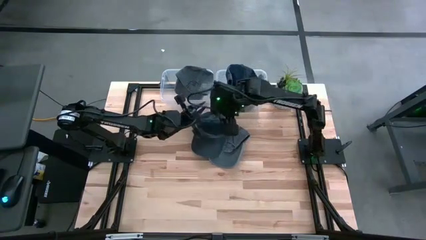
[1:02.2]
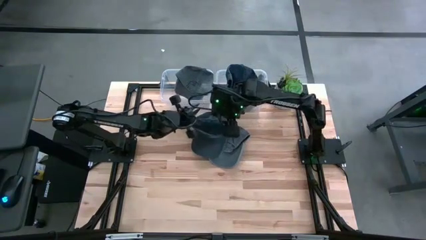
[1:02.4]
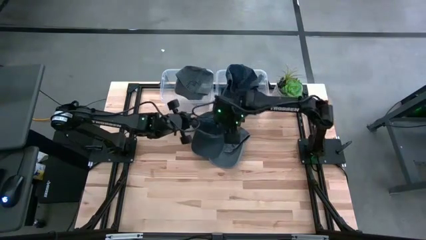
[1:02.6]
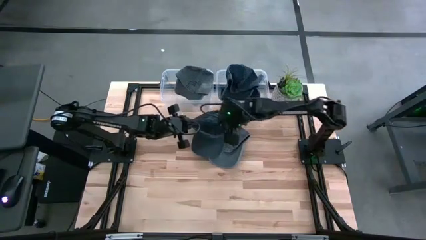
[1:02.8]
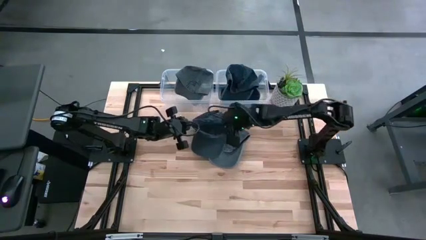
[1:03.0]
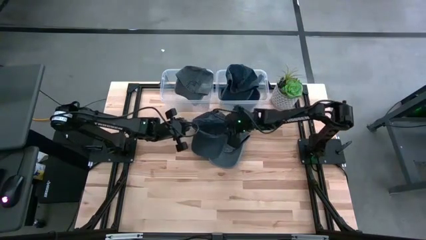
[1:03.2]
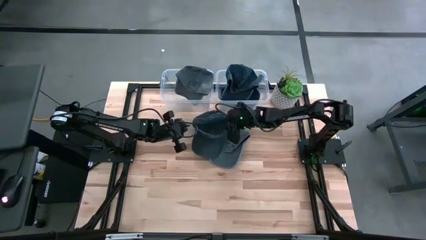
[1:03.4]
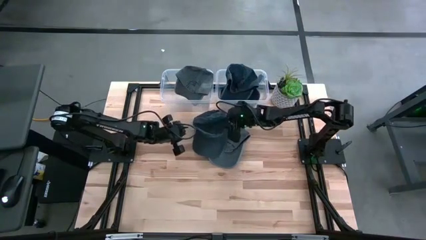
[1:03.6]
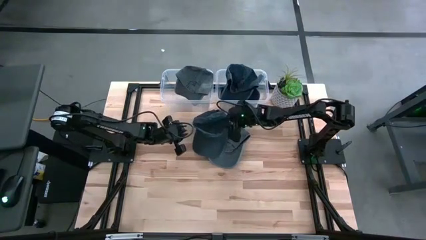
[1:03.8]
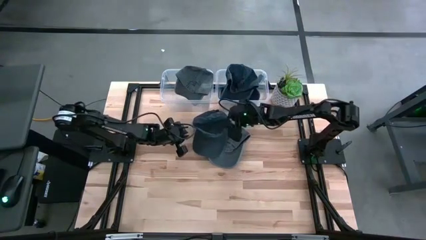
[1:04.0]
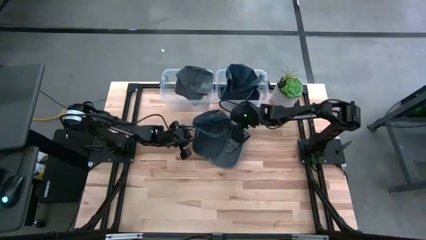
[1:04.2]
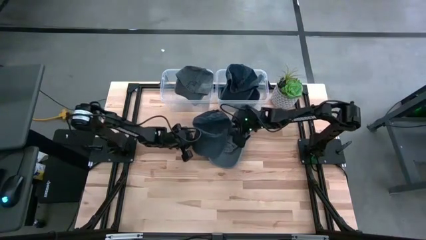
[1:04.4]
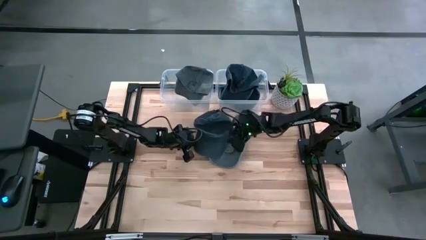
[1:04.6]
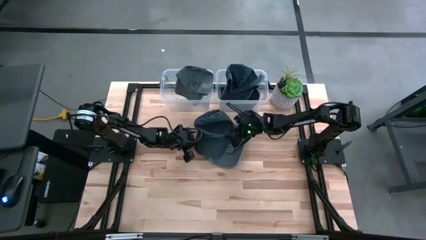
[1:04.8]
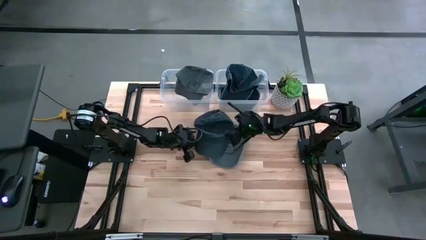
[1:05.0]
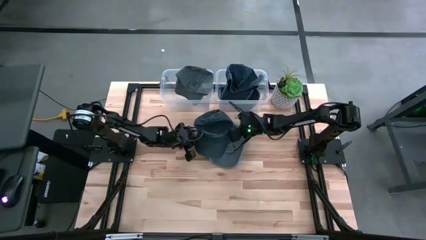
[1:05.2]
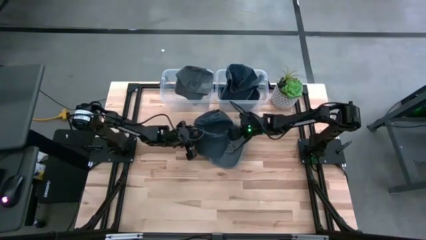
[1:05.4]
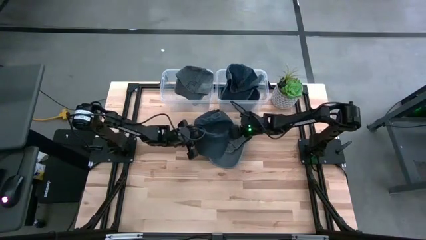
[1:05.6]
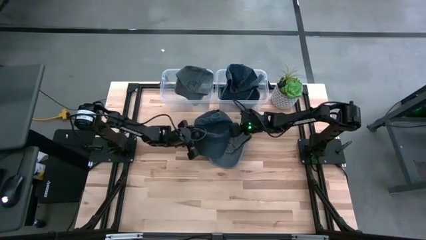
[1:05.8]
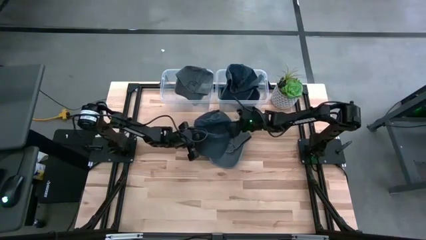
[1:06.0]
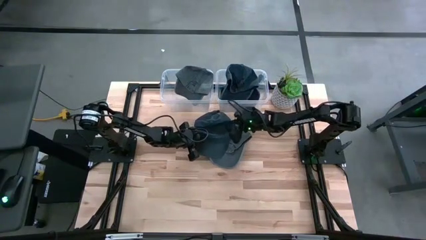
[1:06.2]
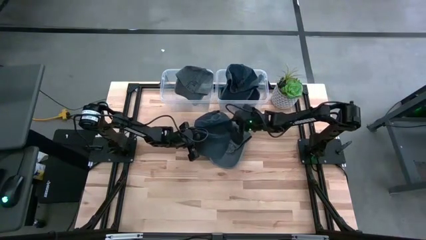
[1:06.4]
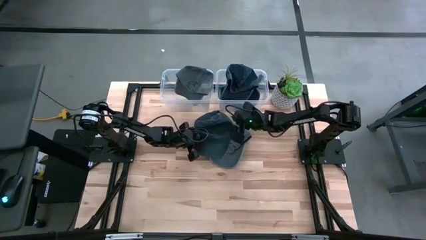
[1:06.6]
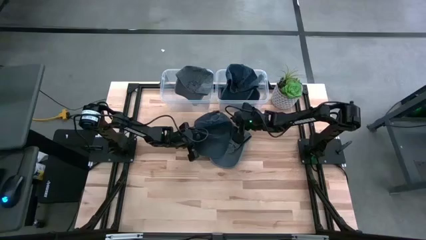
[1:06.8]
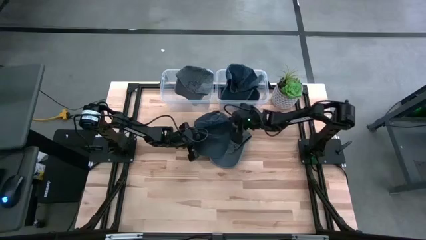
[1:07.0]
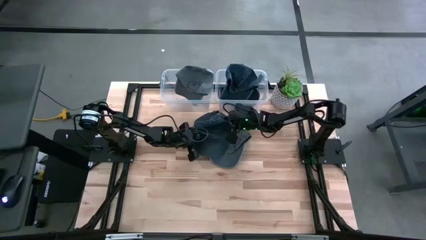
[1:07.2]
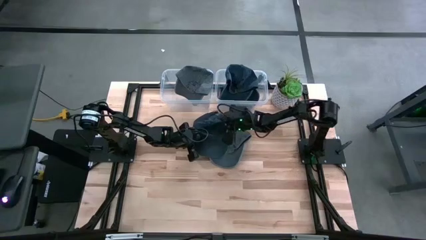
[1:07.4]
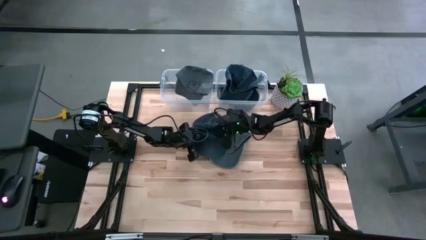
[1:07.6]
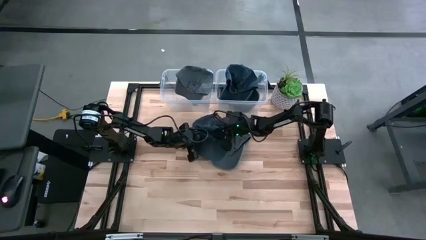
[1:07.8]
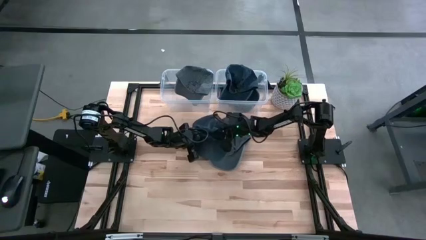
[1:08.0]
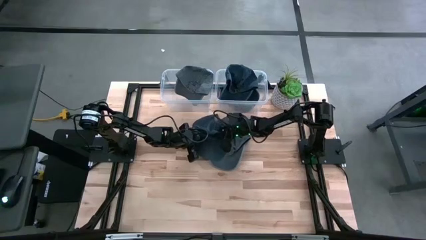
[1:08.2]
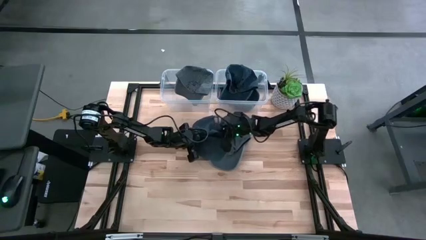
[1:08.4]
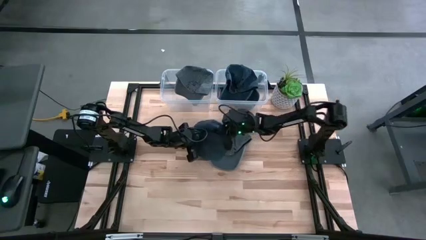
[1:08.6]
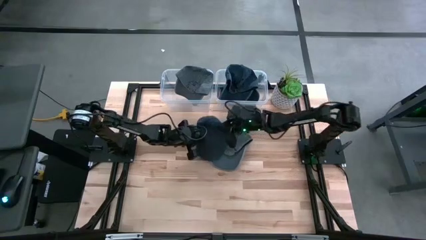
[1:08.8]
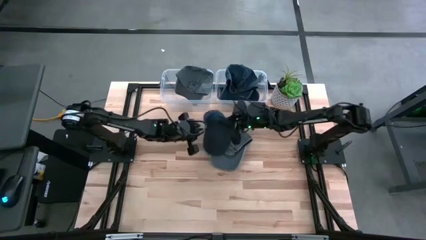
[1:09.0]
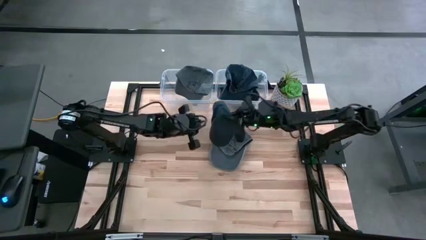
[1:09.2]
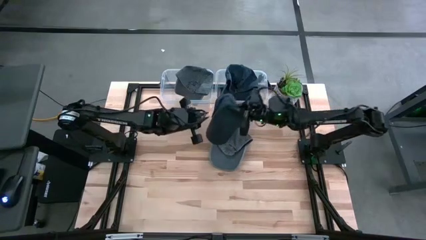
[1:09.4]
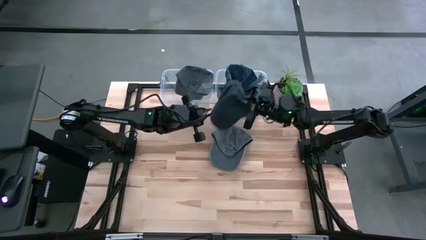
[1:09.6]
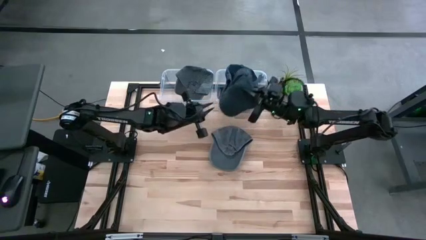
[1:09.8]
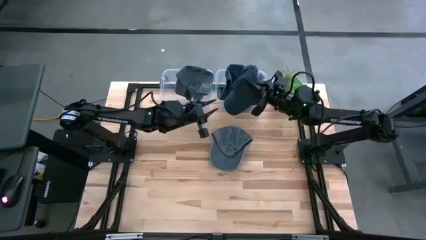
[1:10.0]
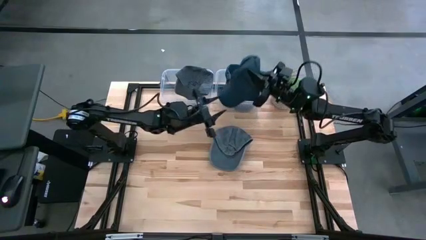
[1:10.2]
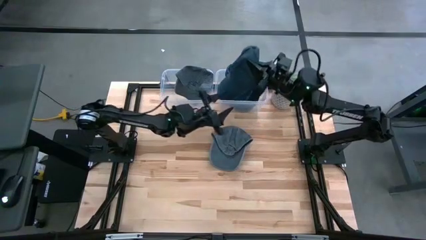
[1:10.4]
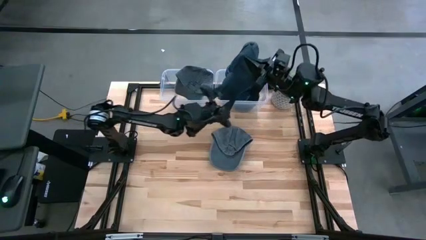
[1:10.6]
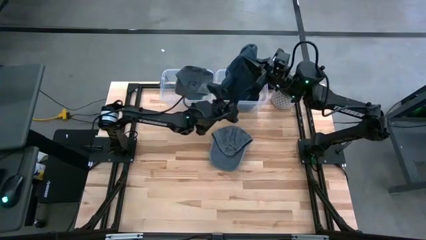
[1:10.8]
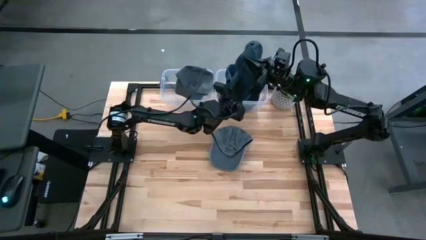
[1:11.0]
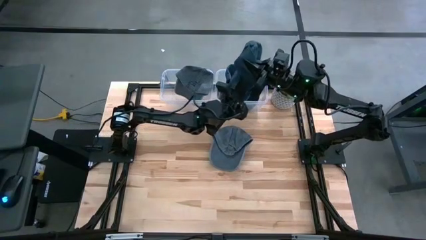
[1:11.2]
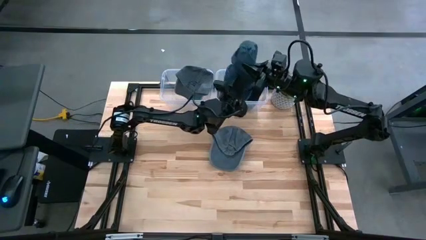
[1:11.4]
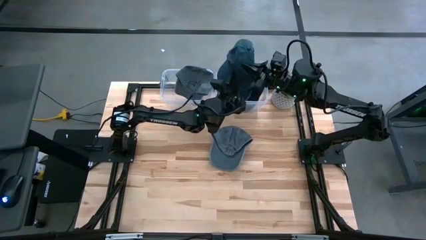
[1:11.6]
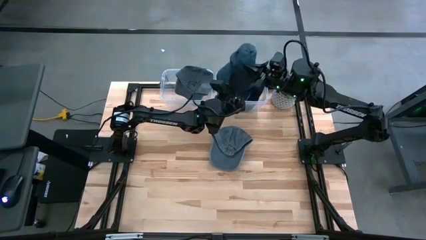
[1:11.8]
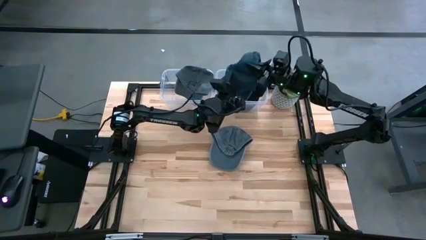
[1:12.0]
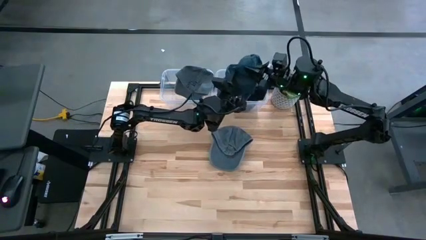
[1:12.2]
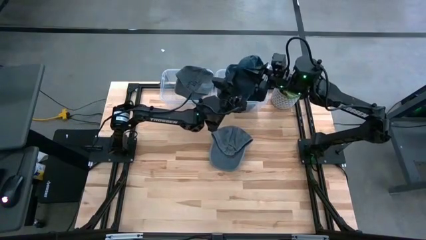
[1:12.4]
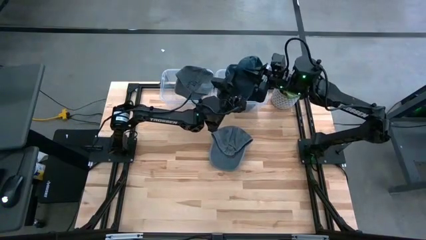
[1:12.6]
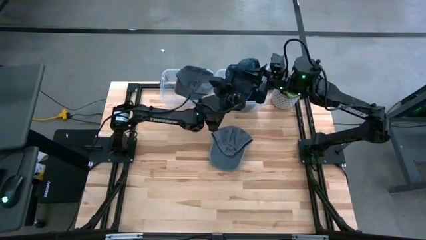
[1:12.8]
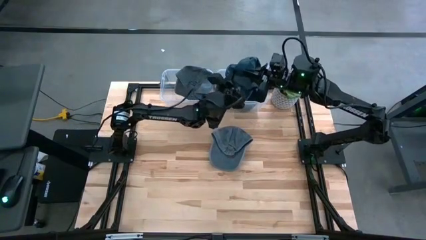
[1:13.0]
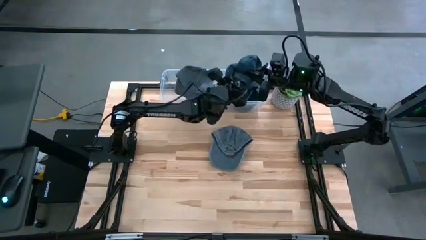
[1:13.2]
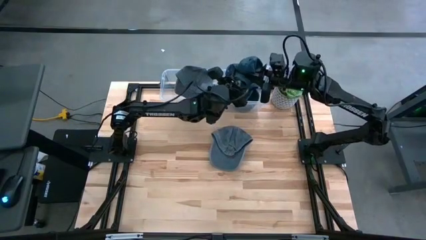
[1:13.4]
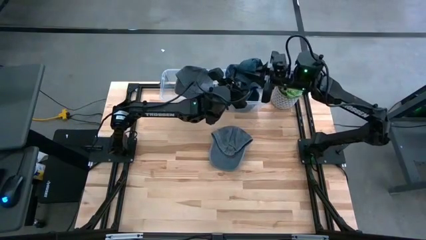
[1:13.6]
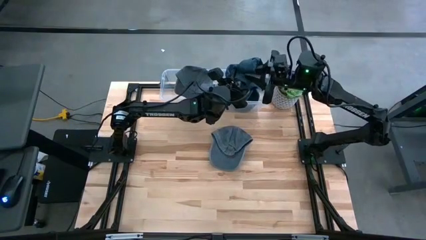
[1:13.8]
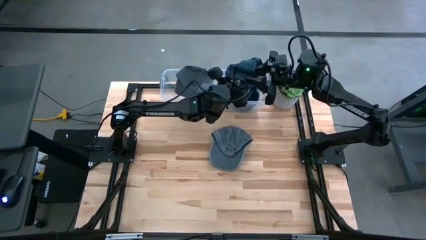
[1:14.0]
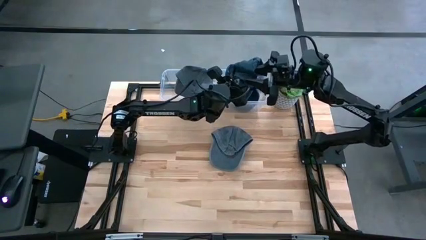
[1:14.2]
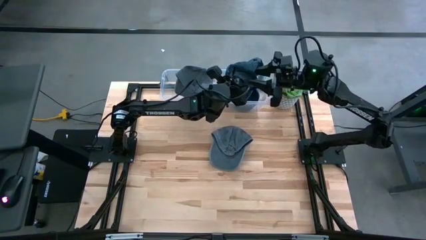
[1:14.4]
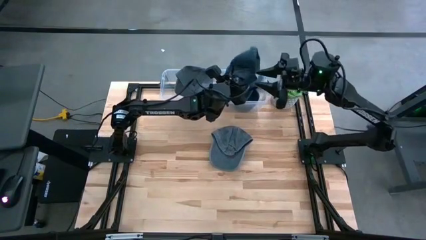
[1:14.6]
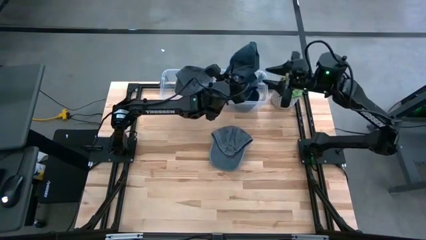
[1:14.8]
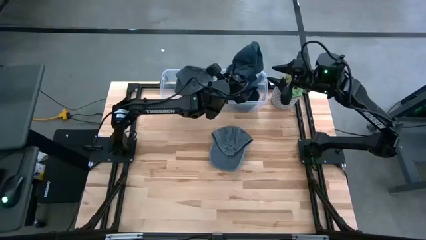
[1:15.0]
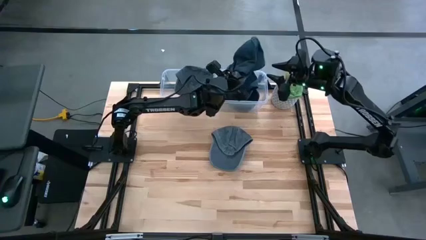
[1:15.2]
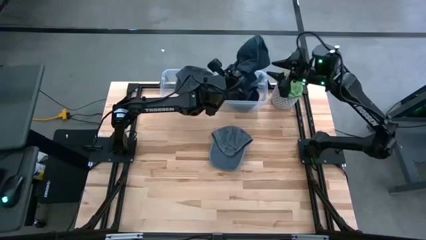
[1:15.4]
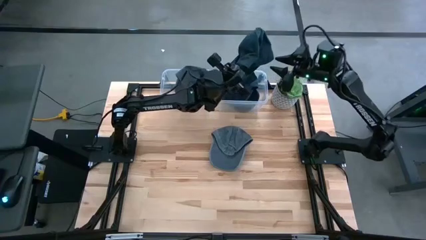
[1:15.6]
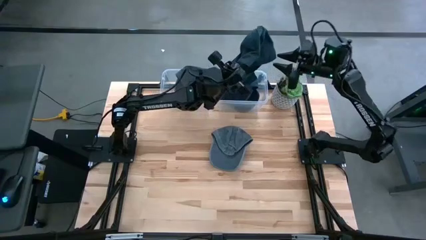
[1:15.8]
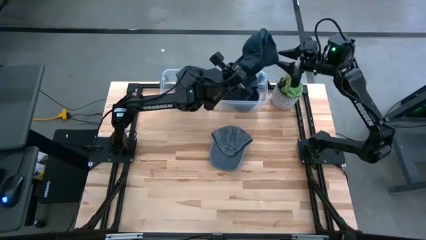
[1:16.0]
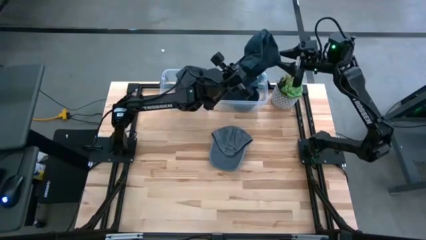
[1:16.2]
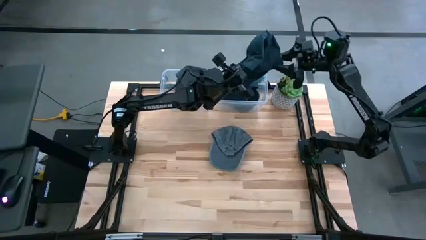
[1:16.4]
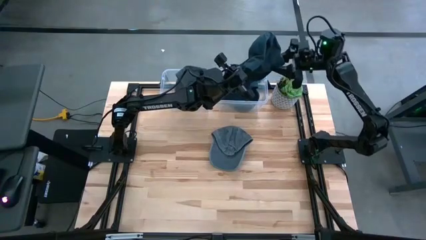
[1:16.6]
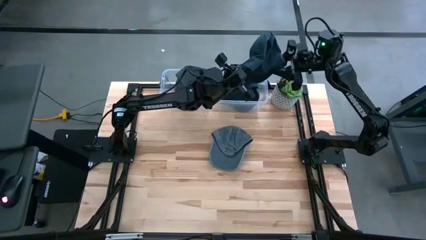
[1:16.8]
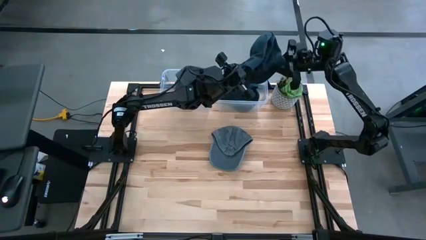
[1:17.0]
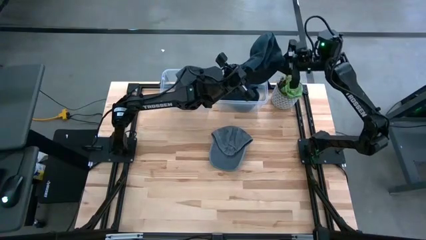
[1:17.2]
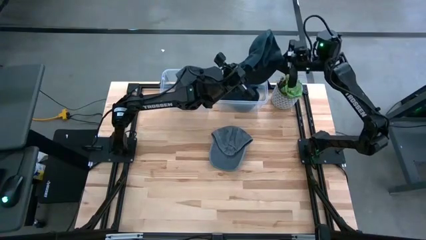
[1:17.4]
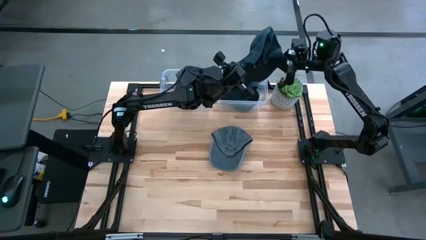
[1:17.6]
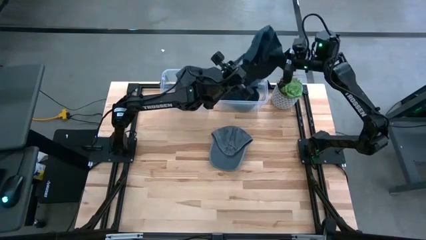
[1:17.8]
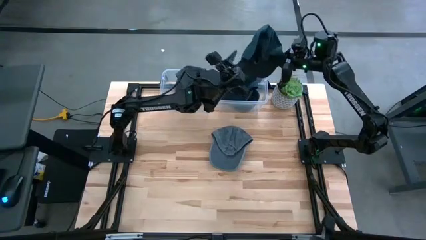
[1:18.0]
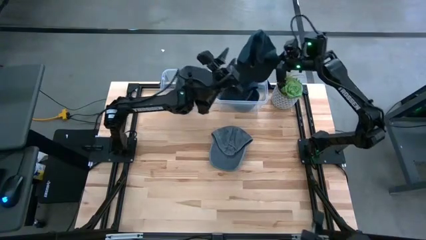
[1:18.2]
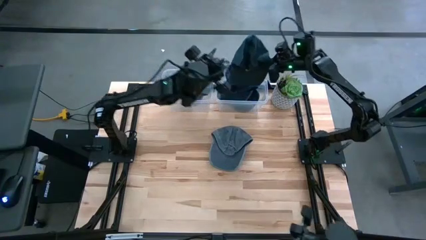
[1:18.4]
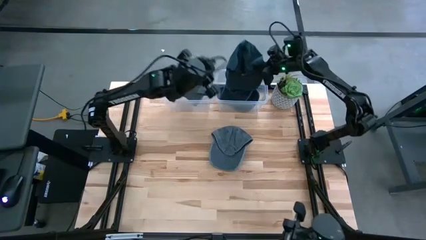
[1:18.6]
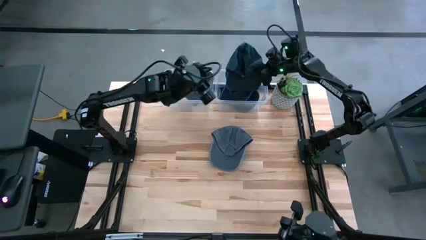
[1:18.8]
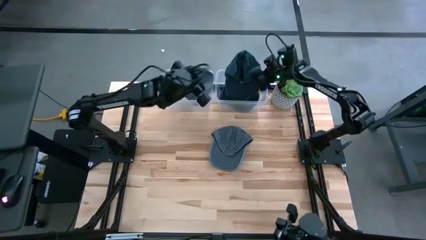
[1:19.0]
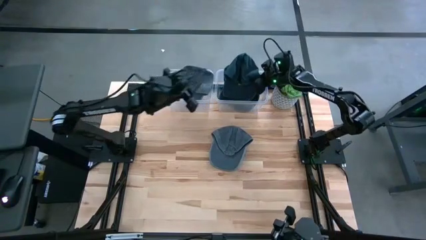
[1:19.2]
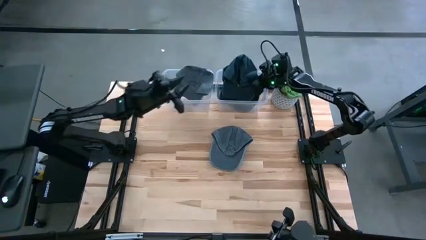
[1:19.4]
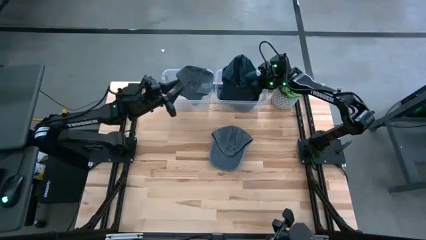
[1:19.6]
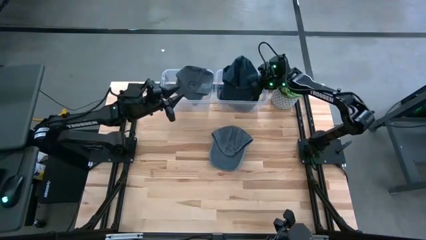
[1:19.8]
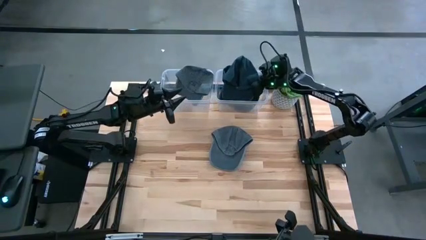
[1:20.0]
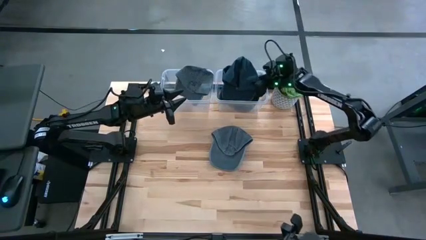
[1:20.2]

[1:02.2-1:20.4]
Task: Pick & Place hat
Put the blue cap into the right transparent bin
